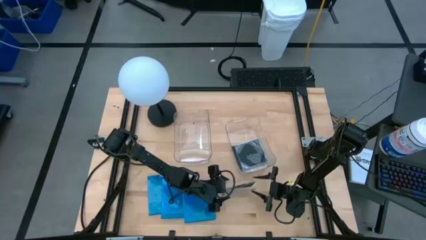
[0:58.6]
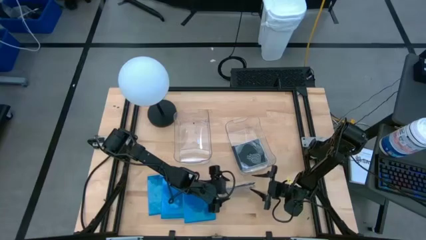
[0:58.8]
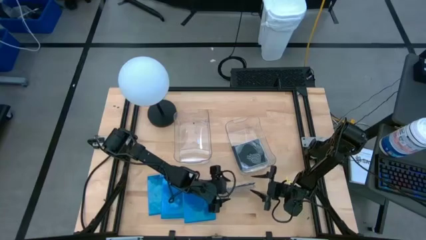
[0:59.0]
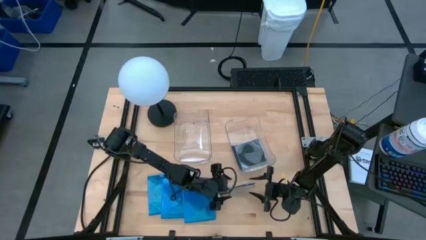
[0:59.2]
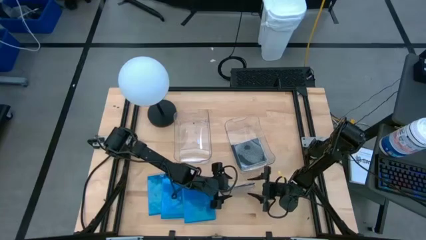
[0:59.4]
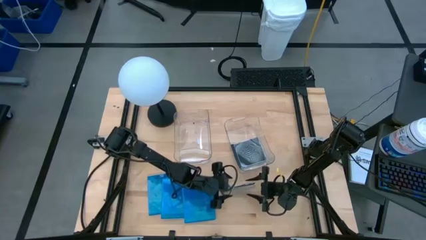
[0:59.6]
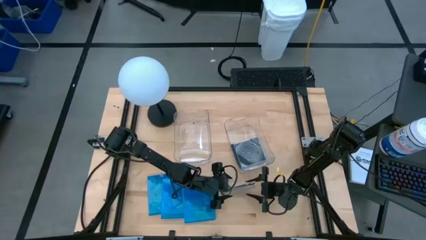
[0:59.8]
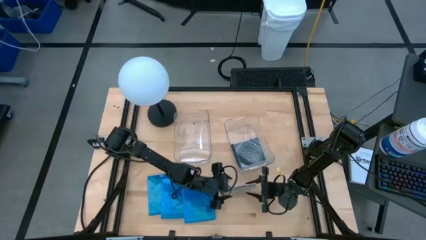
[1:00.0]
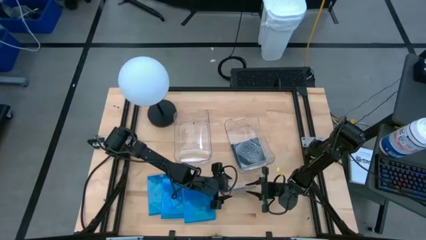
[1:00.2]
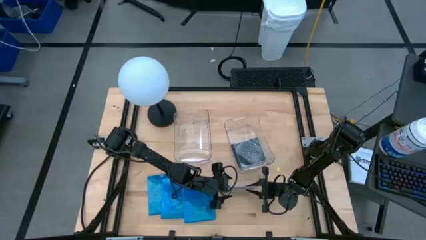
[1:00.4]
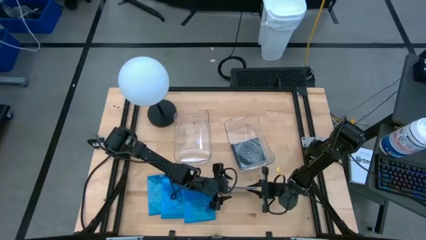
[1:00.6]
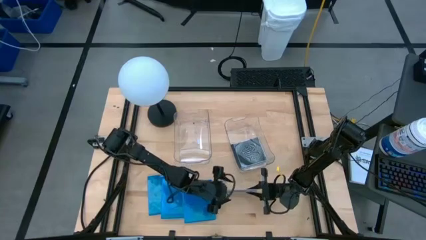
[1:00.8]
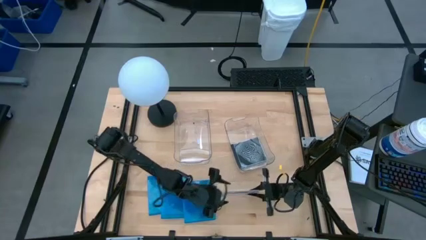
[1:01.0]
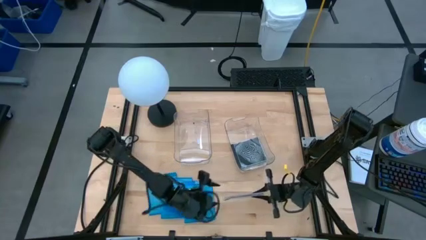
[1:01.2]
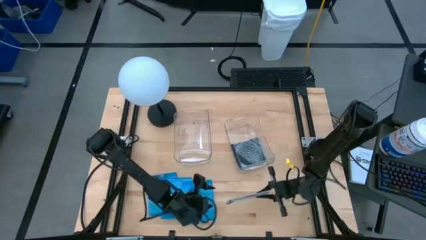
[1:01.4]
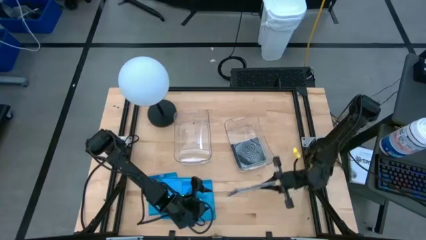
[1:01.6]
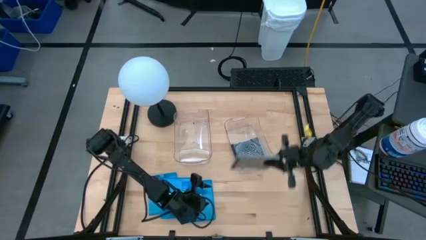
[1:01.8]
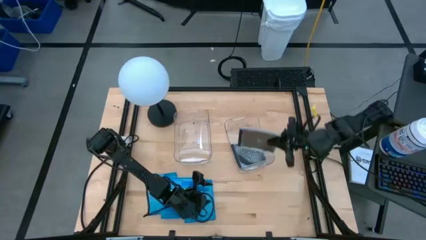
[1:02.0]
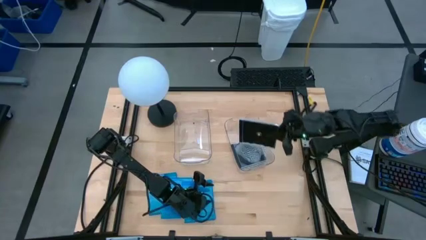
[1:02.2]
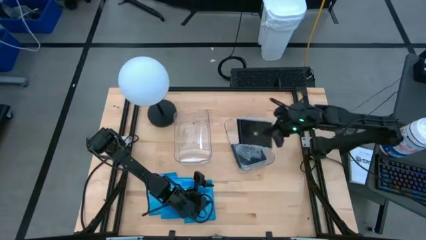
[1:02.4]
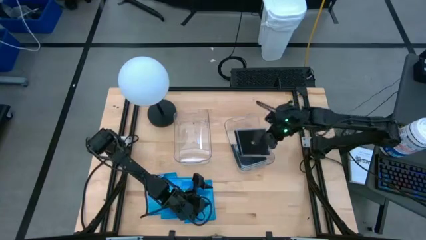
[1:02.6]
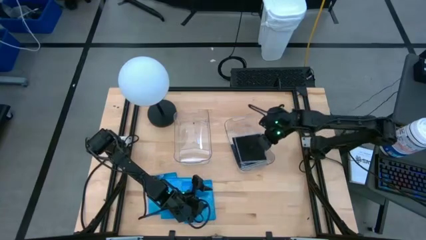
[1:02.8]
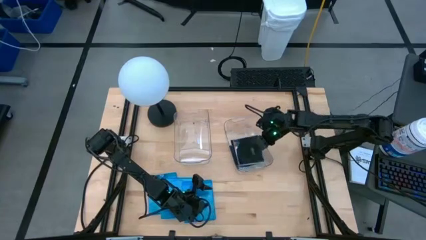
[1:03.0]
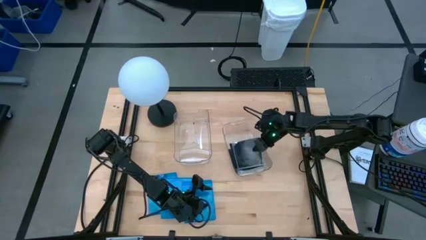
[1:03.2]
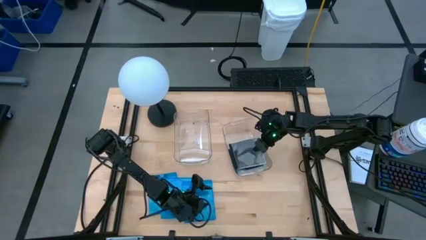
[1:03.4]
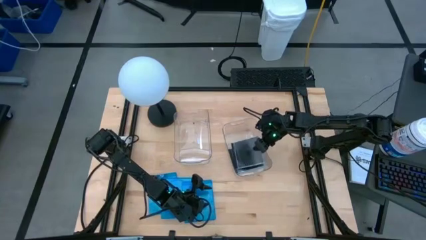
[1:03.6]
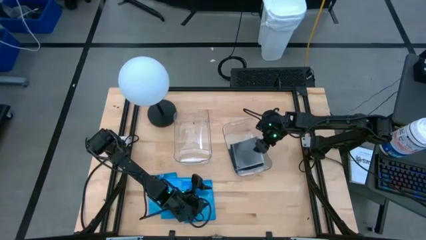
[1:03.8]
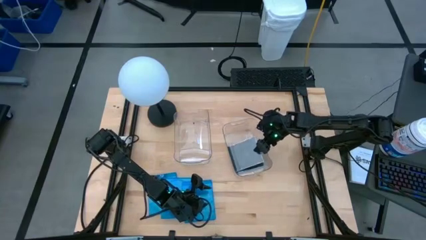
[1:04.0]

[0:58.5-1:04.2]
Task: Pick & place jewel cases by type
Put the black CD case into the right transparent bin

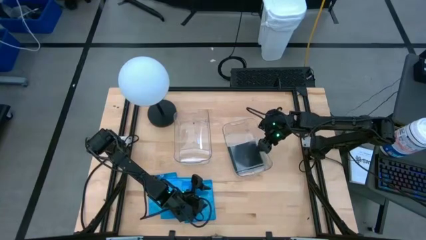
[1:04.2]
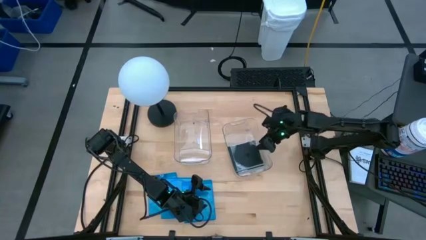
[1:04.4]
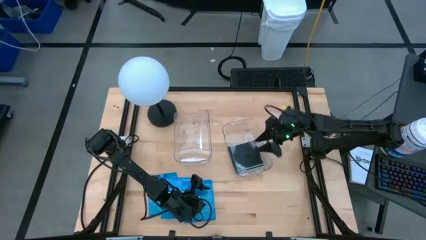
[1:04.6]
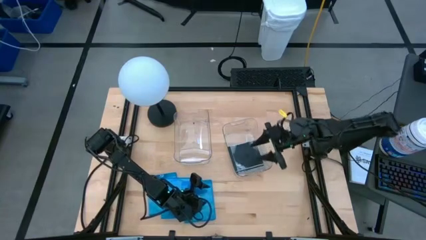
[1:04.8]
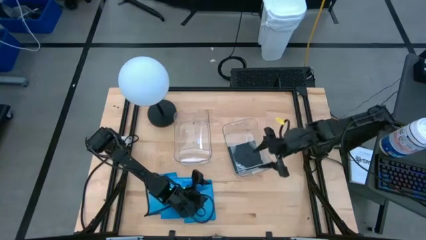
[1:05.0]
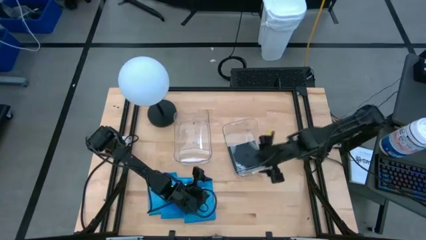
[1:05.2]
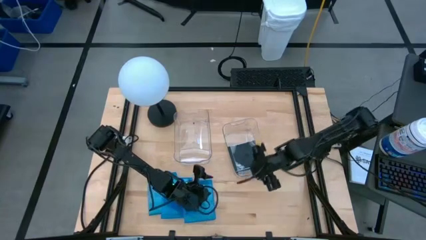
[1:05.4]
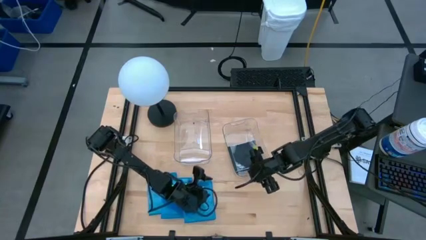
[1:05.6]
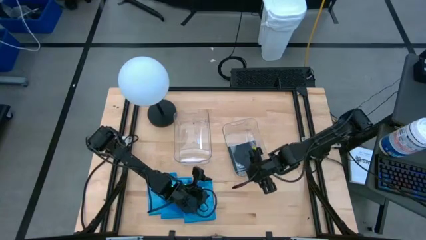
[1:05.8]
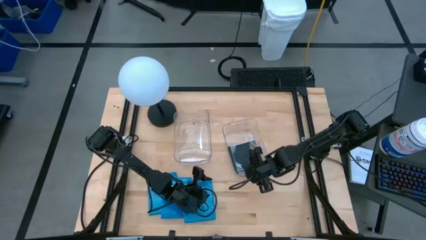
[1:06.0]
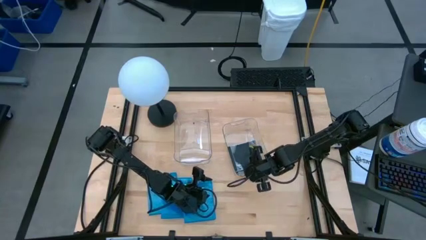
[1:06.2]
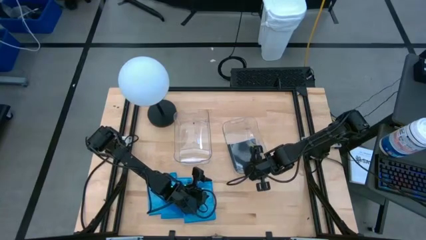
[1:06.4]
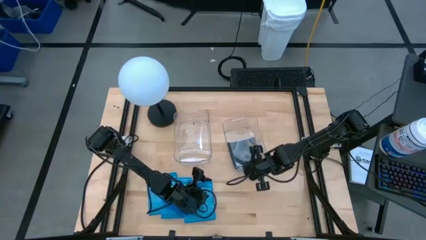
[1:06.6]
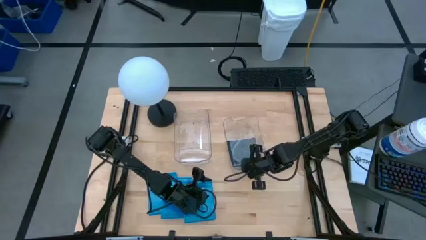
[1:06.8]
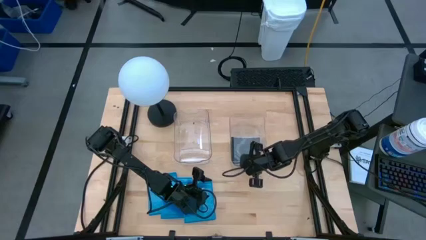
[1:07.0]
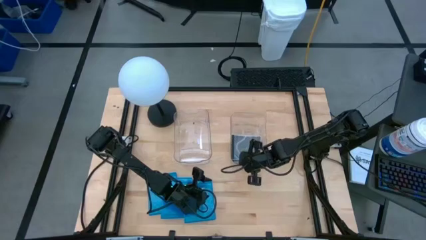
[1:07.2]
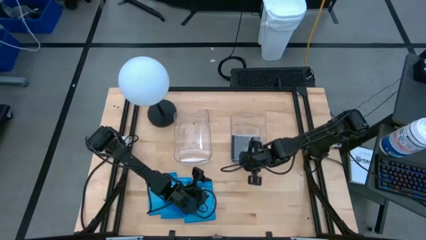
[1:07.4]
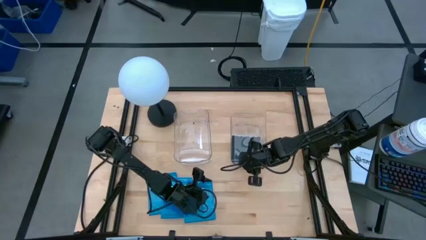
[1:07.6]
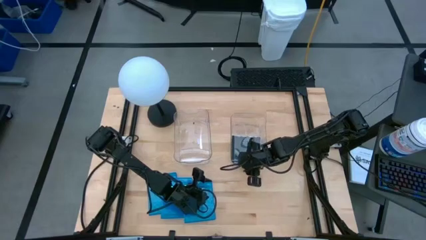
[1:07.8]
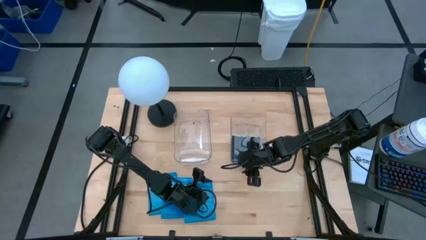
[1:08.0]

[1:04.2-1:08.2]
Adjust the right transparent bin

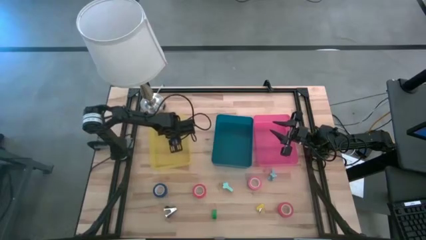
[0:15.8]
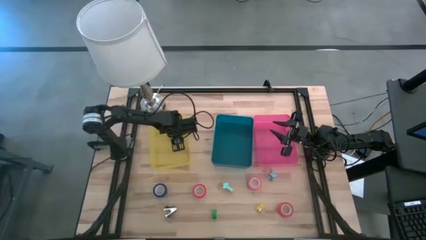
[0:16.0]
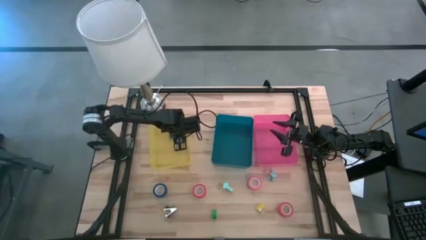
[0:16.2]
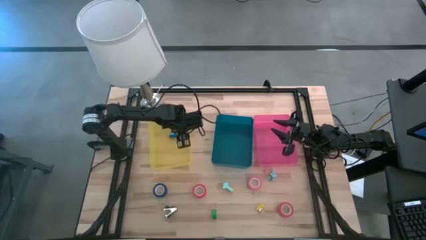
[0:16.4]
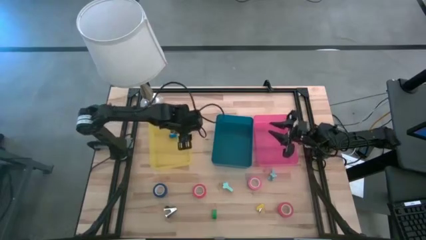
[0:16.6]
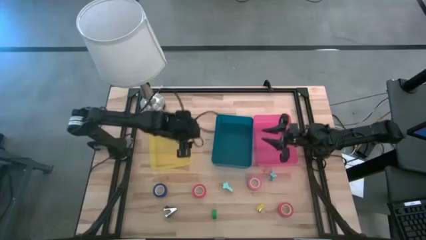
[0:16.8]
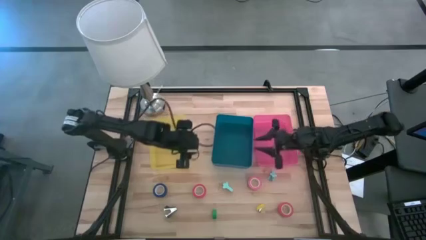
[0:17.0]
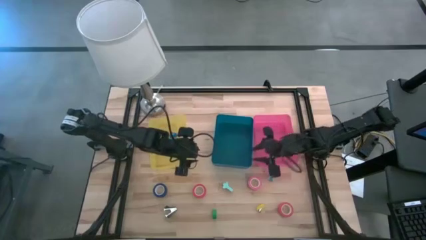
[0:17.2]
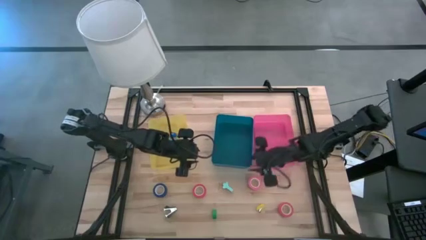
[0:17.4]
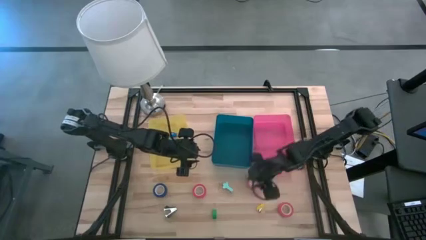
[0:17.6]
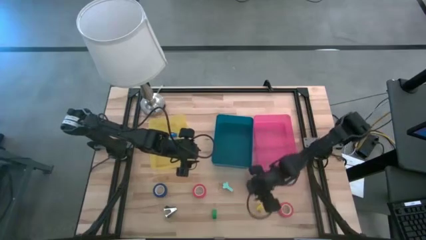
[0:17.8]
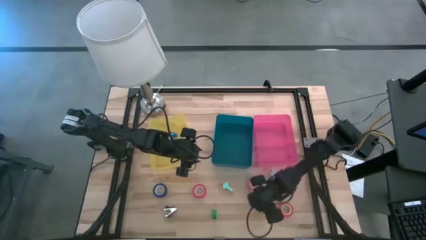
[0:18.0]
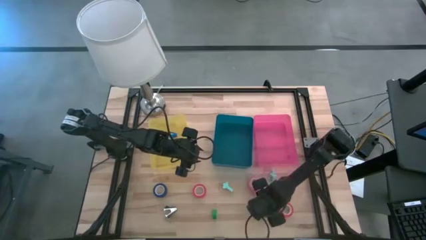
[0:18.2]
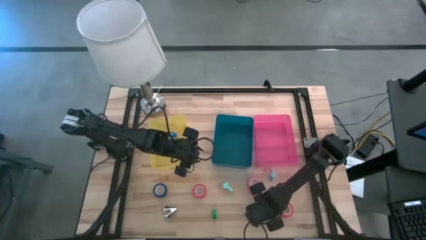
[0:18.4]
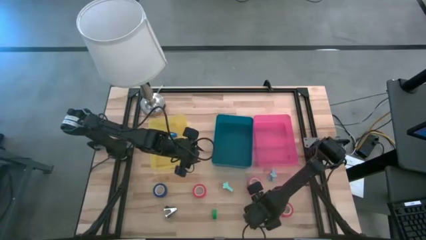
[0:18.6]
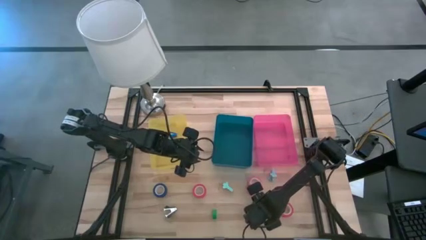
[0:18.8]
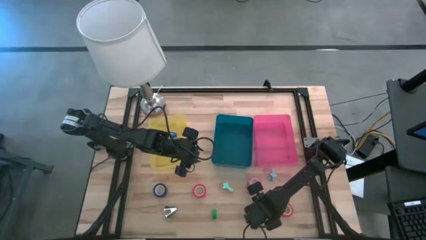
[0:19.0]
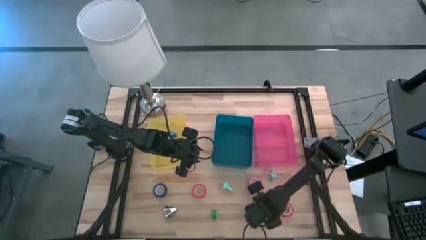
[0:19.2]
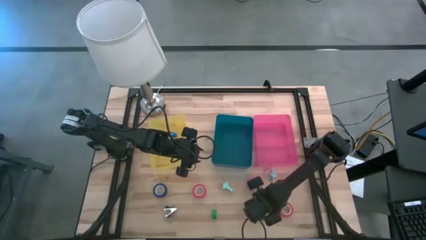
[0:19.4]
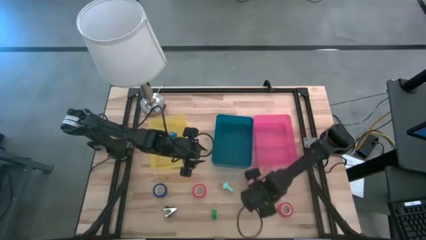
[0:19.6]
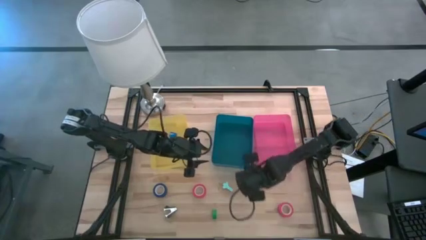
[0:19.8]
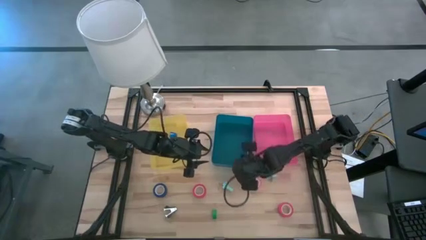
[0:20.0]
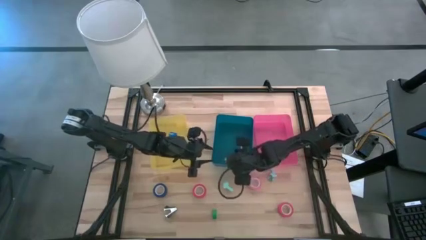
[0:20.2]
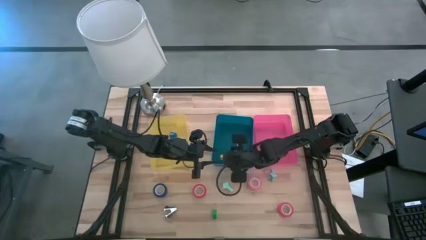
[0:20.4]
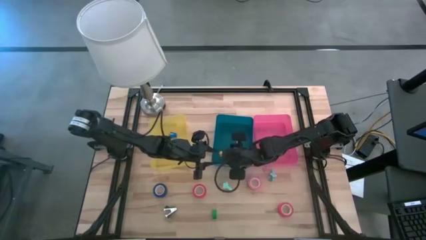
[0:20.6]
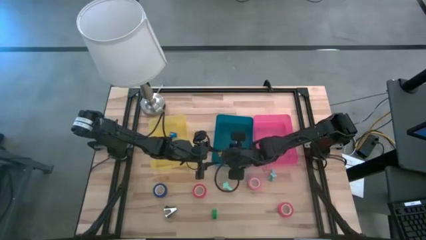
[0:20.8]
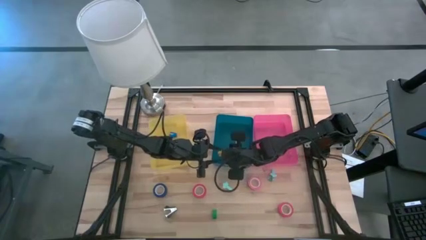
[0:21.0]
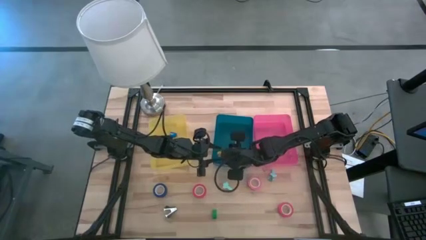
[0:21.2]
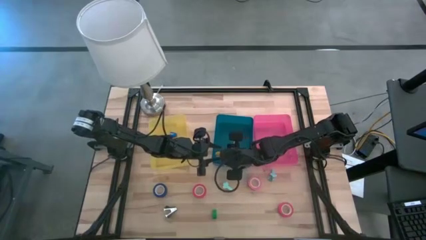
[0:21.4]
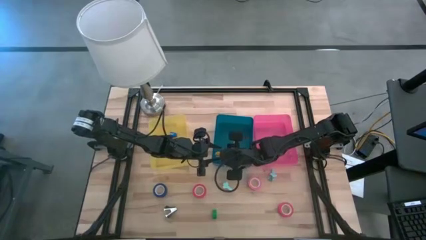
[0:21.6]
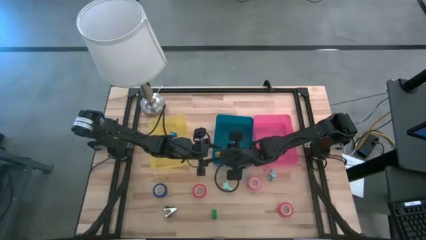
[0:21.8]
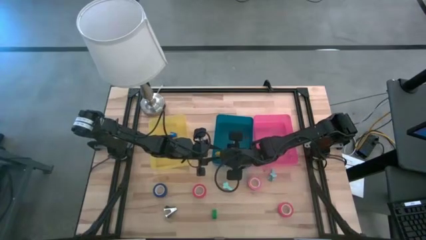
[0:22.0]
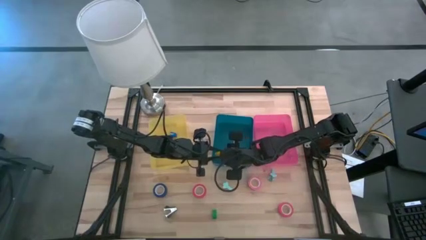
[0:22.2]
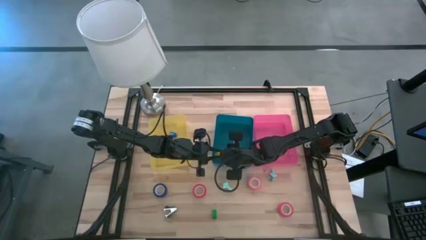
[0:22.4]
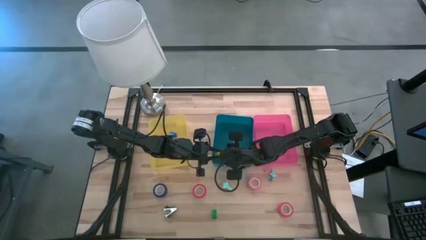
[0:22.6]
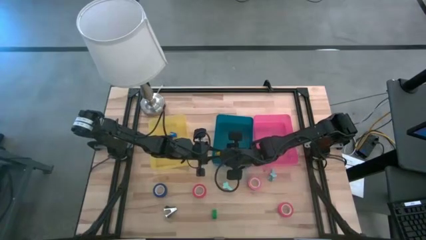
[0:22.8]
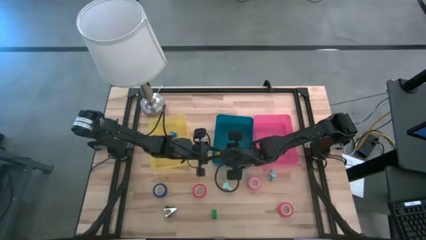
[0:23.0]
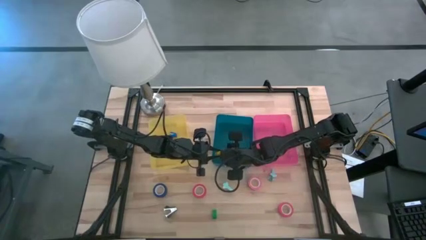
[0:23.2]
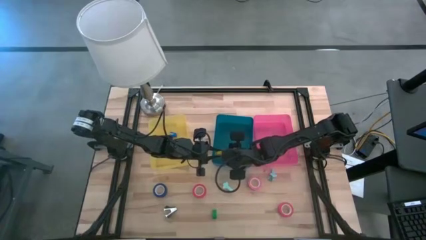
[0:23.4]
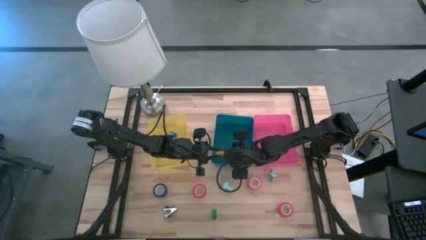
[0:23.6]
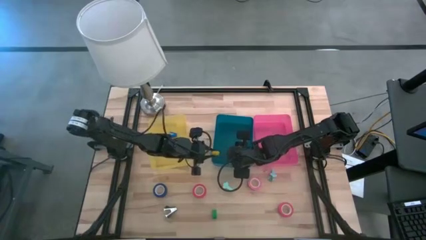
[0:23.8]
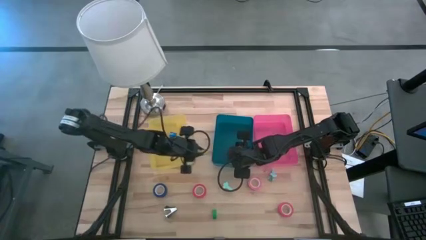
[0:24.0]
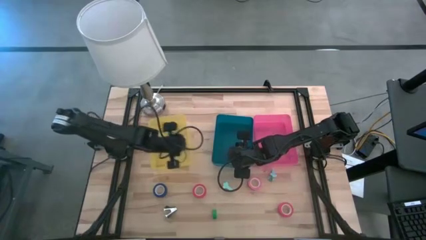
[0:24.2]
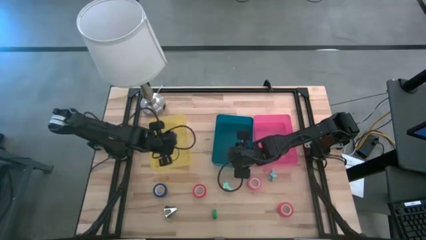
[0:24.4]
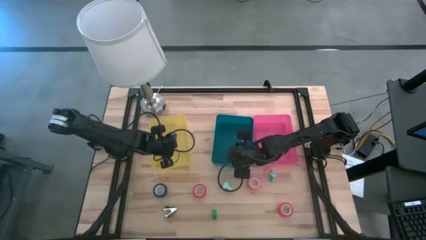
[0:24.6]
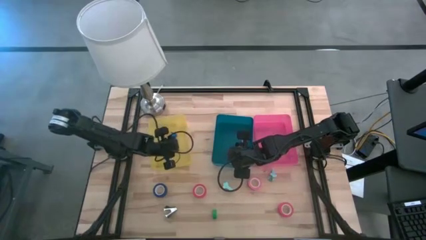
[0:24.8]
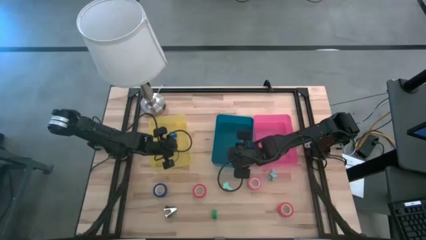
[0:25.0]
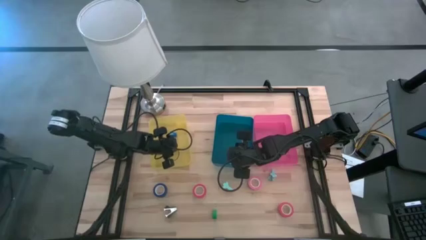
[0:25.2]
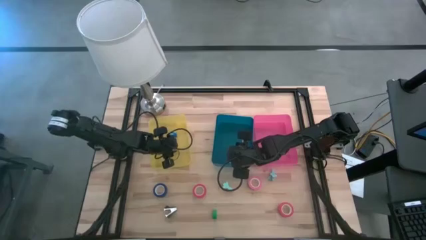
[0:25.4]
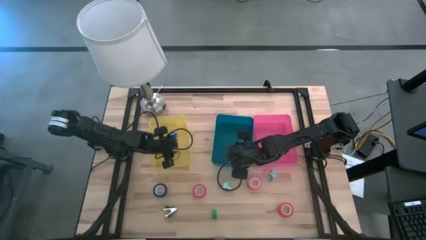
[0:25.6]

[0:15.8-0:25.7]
Task: Pick and place Stapler, Stapler remover, tape
Put the yellow stapler into the yellow bin
